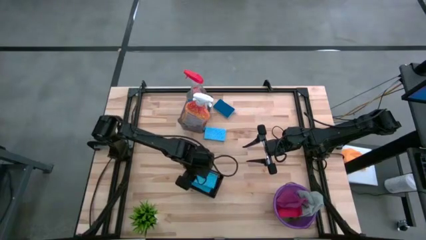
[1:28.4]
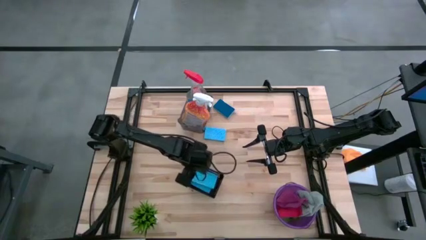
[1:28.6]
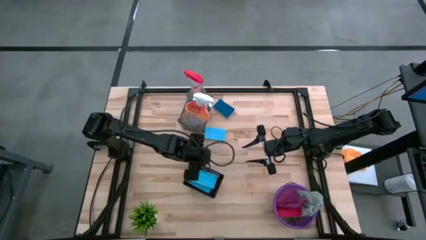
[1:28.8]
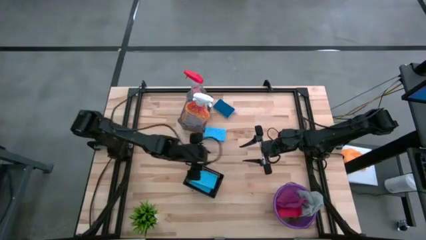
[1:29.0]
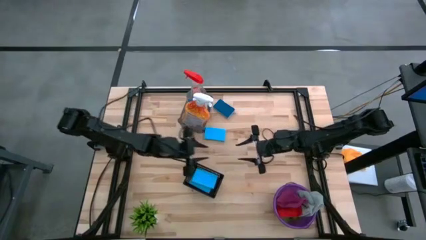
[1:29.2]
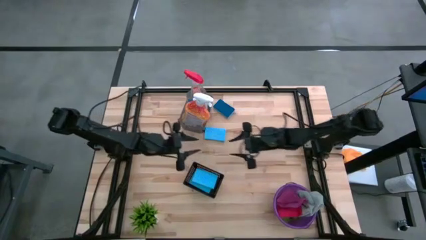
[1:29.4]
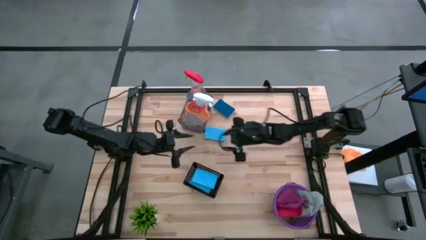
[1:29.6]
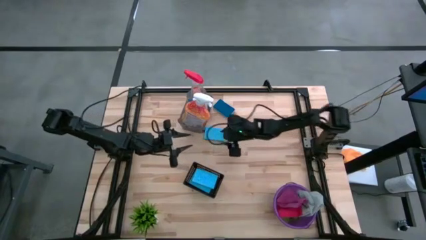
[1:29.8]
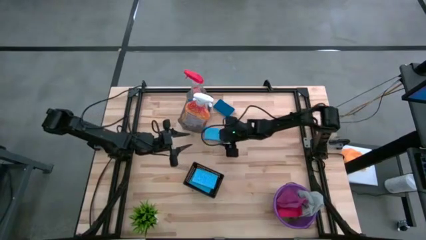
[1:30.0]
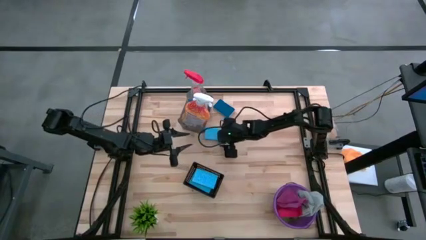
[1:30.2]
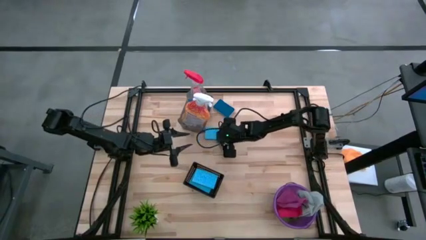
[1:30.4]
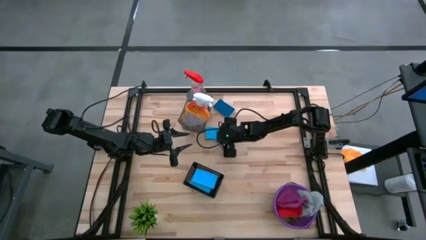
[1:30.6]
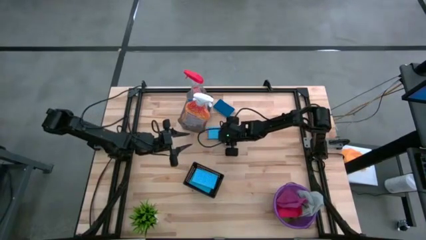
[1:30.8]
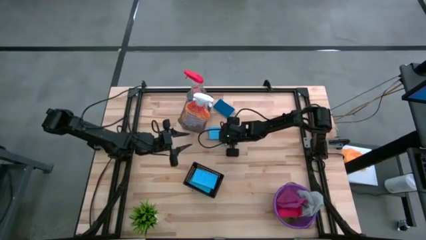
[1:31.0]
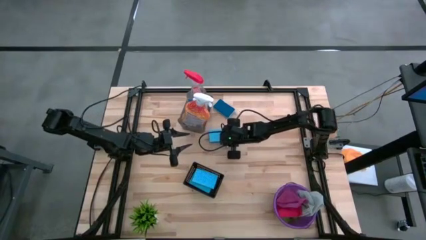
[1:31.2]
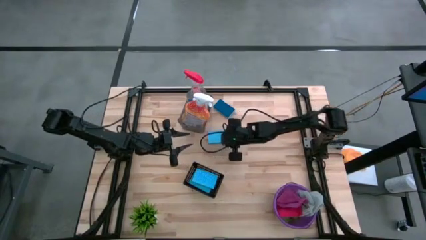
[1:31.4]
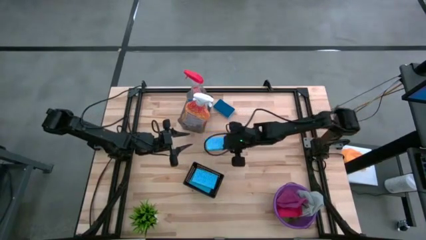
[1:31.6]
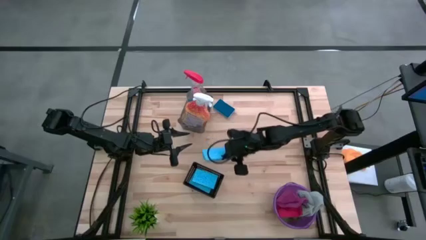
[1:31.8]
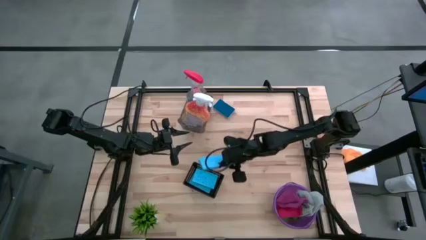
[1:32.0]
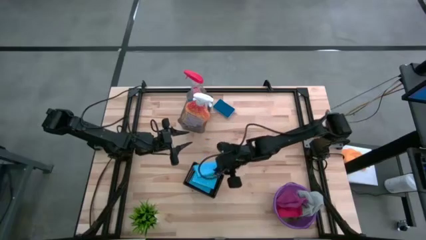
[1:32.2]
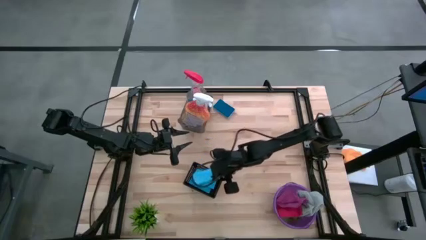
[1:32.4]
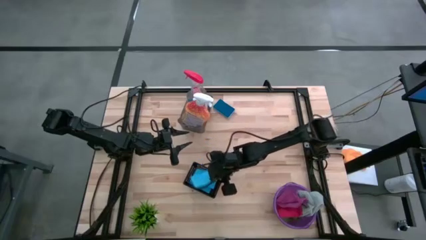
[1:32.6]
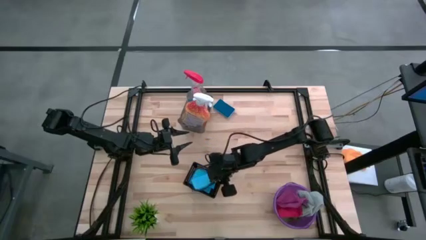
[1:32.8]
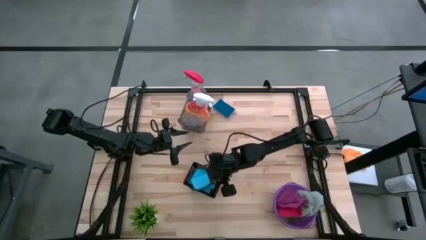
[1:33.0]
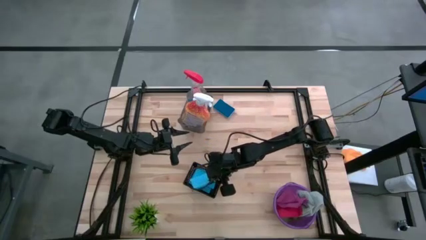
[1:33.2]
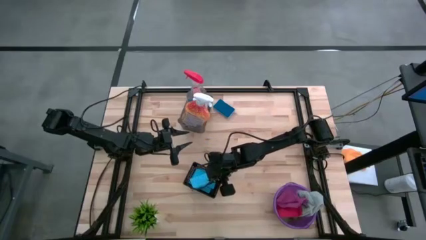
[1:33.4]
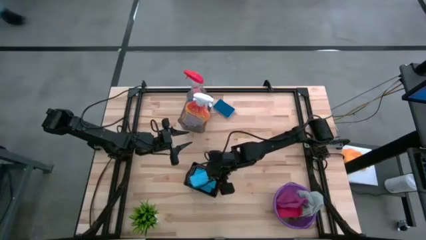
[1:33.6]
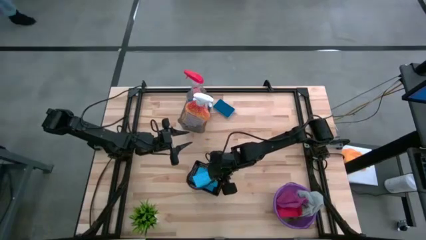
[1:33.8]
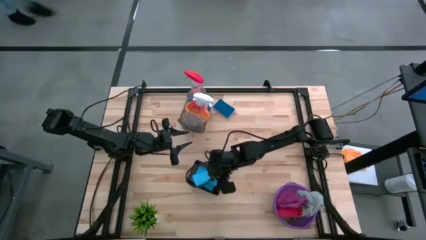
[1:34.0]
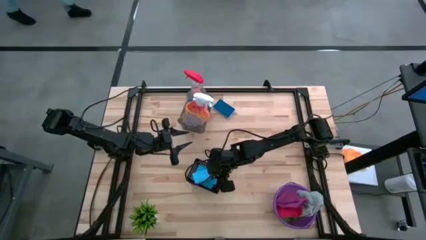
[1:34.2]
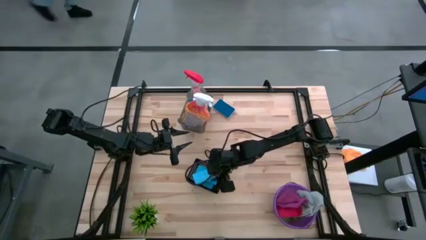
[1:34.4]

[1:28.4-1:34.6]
Task: Pick & Place Kitchen Items
Put the blue sponge into the black bin

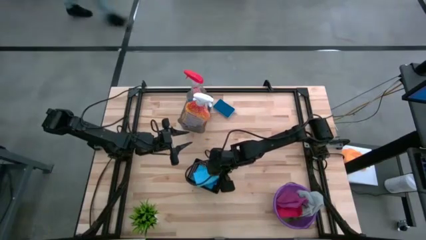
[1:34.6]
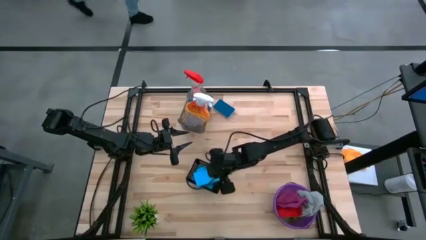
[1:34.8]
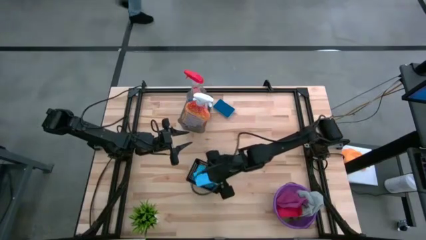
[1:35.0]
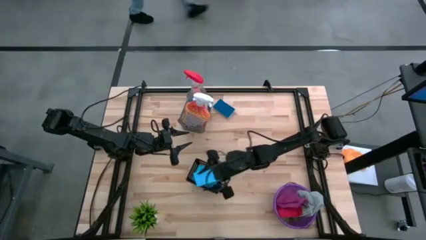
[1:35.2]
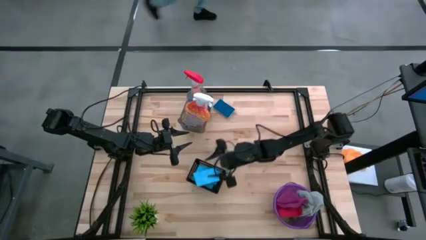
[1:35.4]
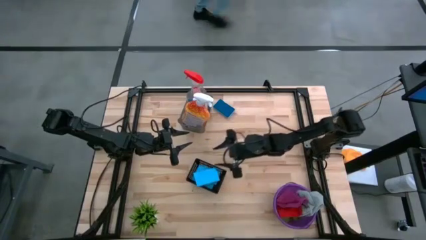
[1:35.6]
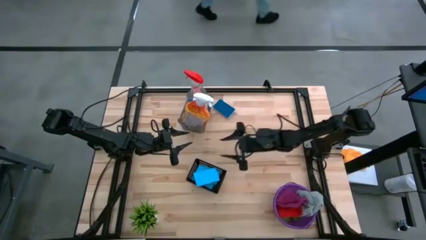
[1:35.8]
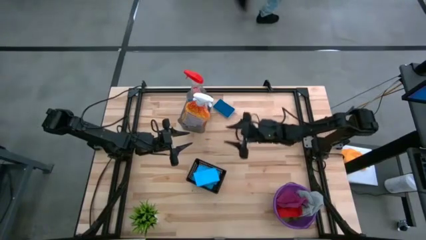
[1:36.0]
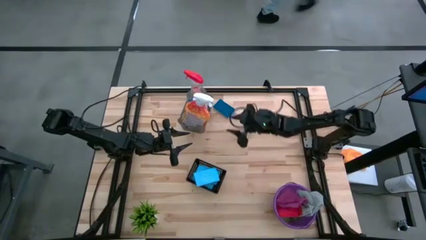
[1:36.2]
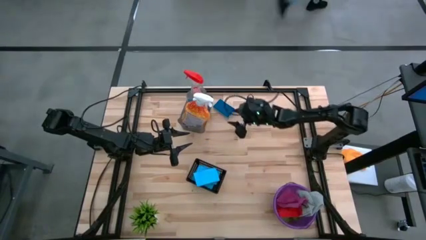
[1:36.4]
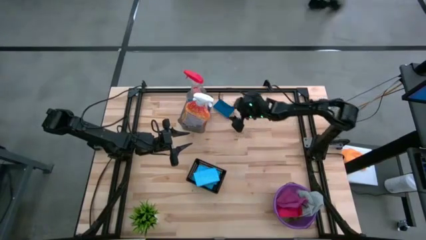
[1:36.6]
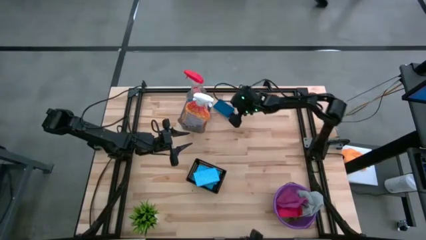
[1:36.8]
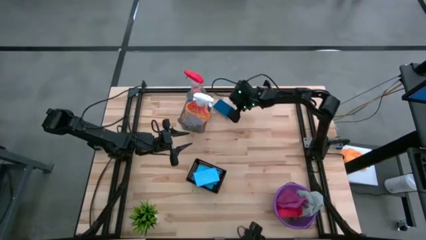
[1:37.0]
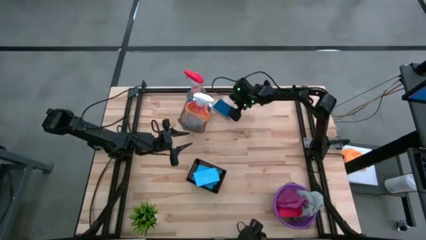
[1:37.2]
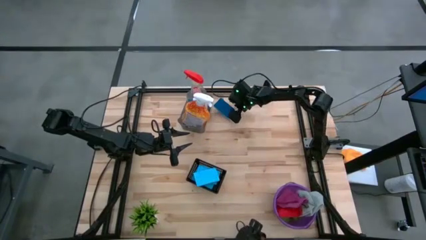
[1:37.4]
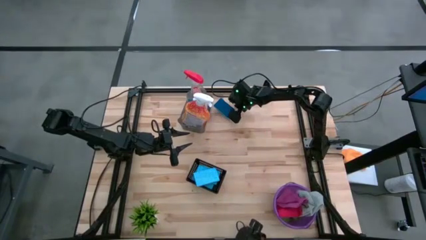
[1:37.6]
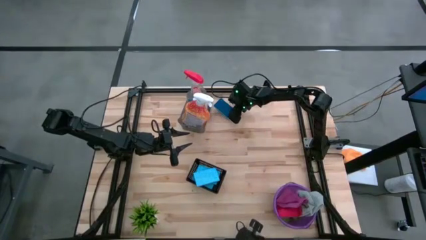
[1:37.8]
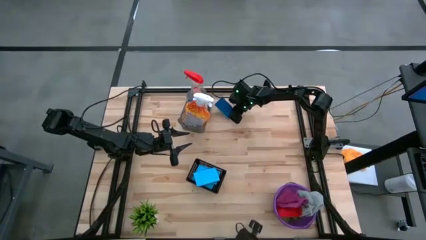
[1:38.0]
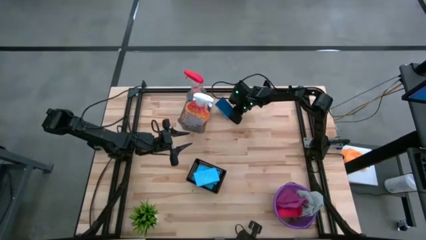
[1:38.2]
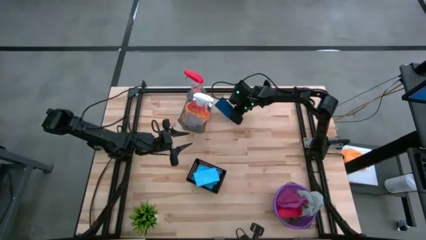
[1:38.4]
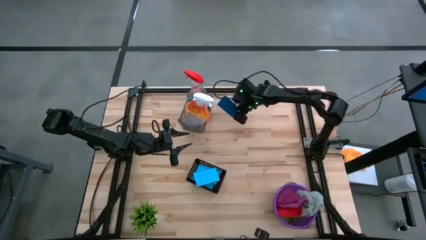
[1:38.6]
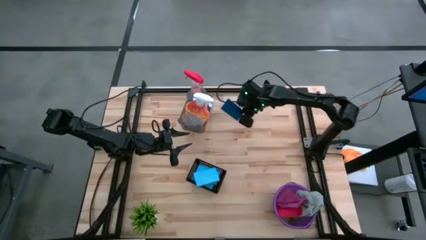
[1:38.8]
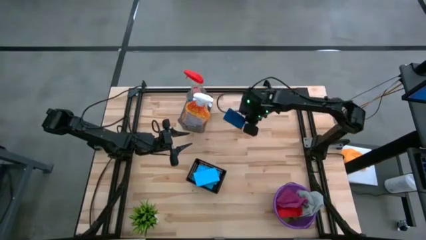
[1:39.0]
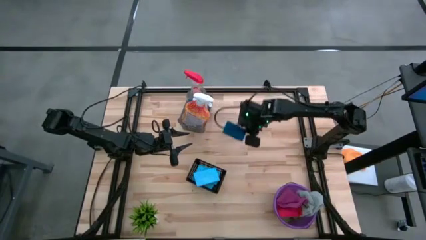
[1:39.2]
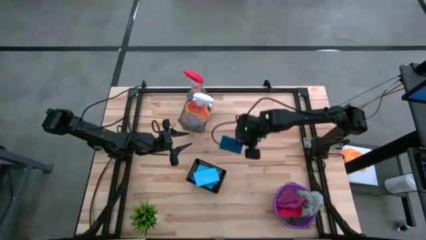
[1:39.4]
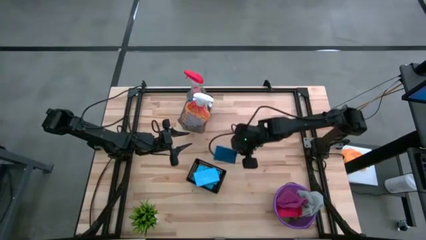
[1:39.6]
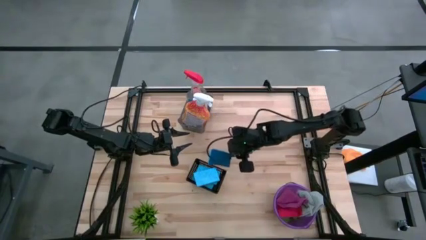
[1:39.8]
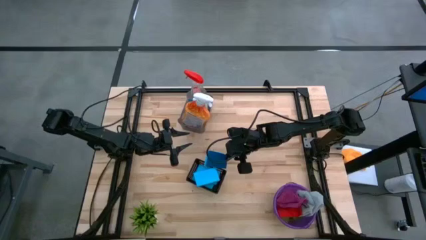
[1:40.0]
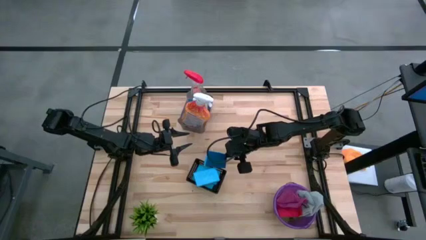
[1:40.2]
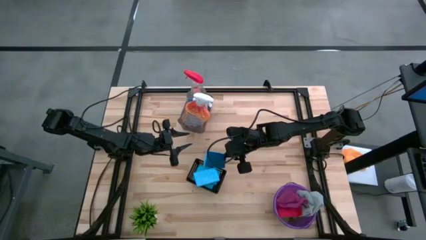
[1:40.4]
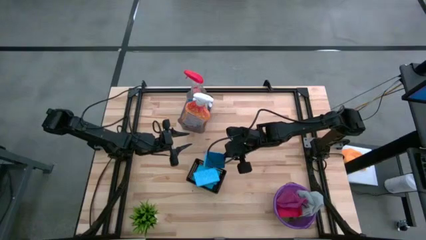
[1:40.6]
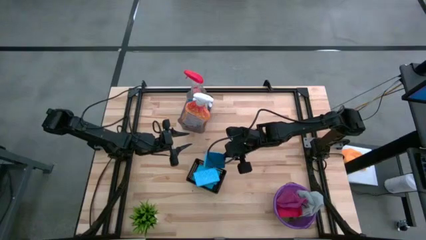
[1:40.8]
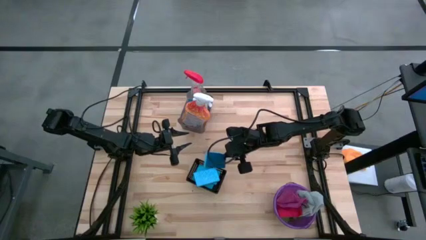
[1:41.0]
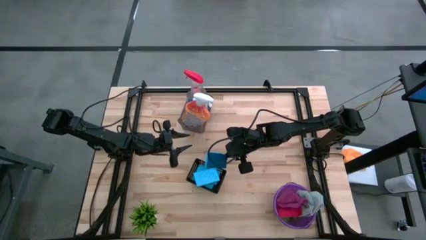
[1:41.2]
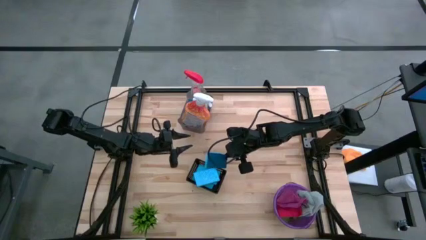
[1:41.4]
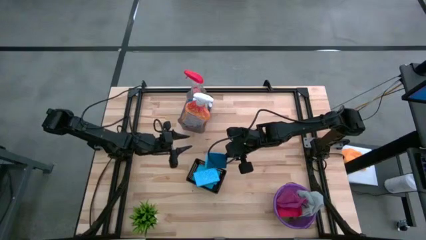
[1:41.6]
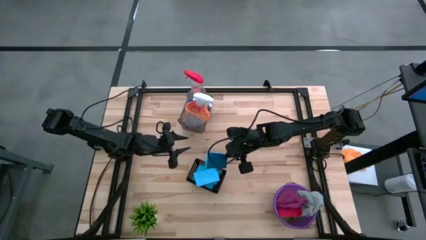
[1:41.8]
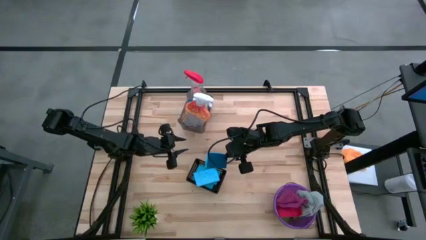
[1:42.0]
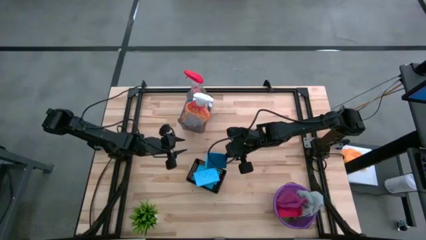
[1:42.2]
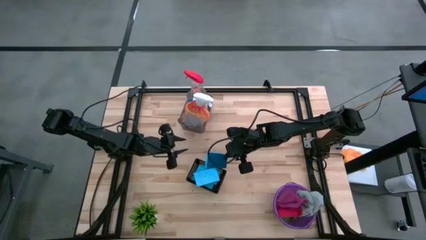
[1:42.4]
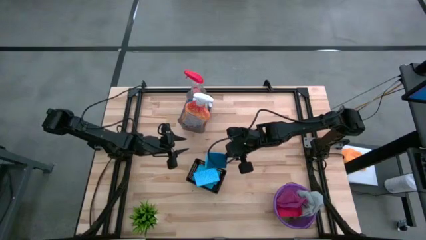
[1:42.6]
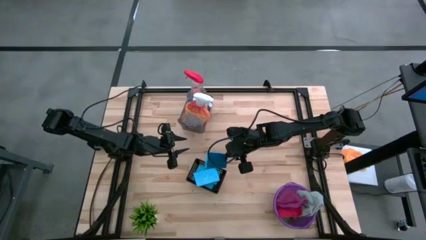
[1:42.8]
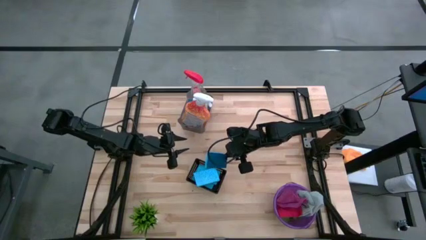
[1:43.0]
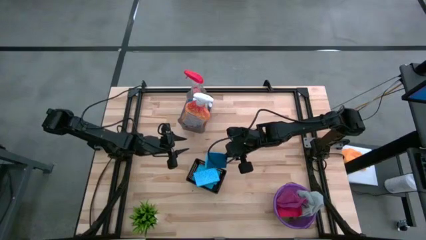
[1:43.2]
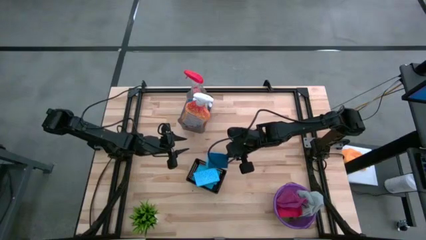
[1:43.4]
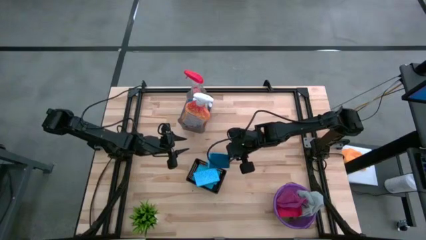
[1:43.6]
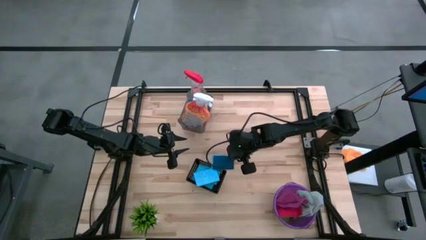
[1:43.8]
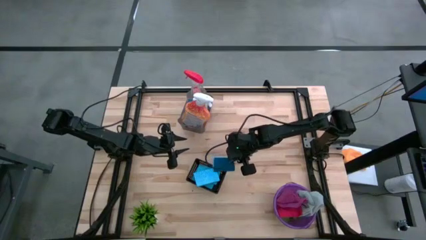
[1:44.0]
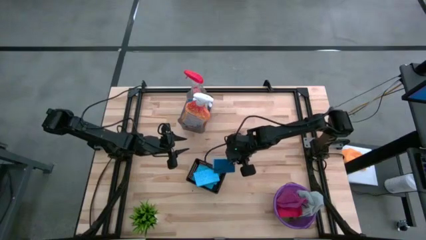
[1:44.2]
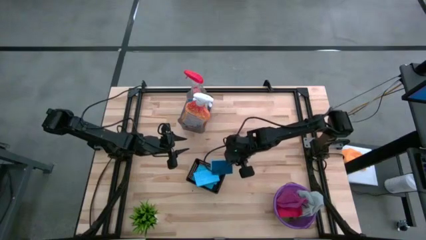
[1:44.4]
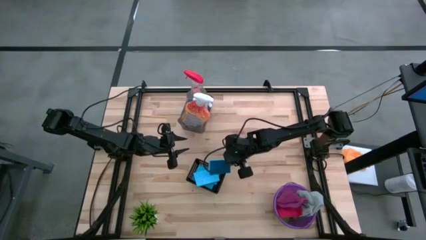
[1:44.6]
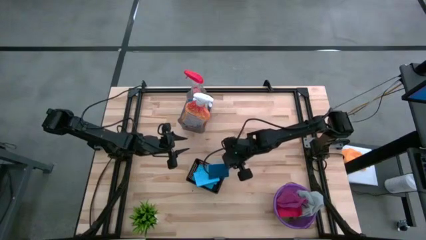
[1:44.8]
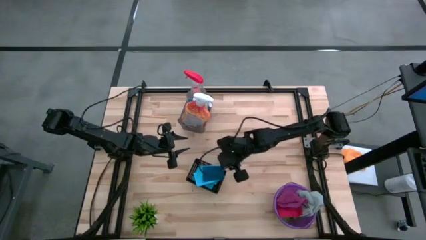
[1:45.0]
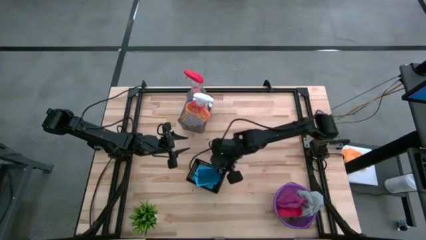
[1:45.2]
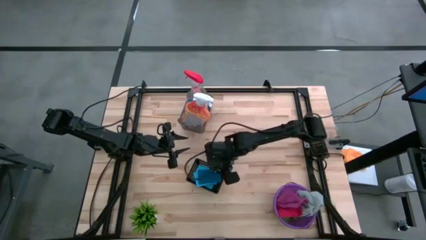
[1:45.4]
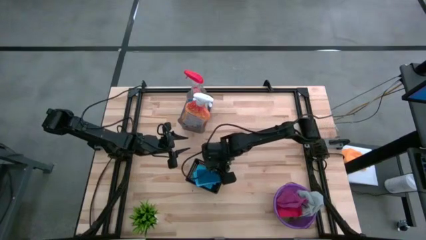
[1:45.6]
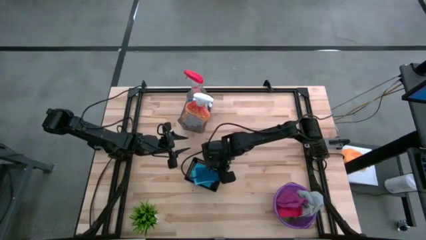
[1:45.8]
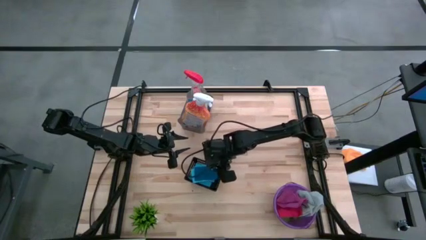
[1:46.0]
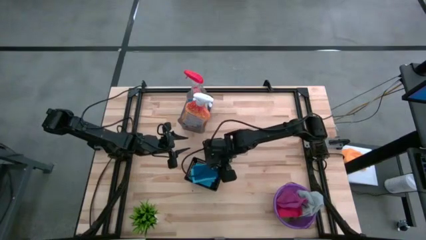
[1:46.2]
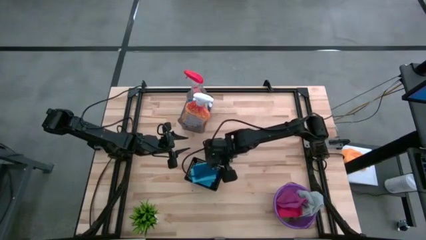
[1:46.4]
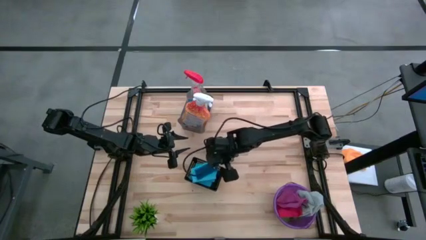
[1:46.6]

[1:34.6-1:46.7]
Put the blue sponge into the black bin
